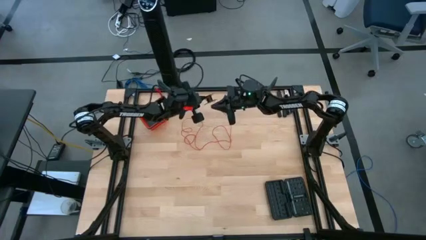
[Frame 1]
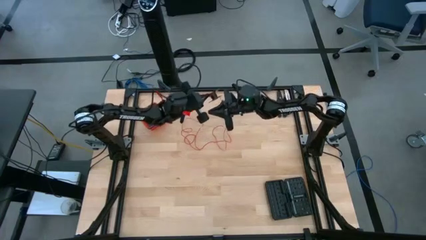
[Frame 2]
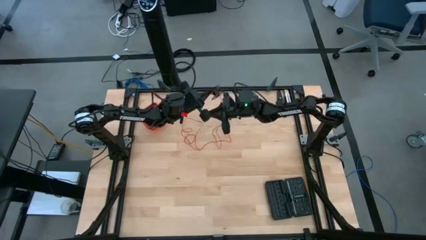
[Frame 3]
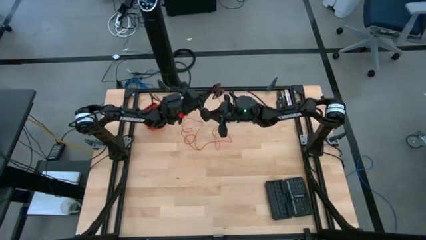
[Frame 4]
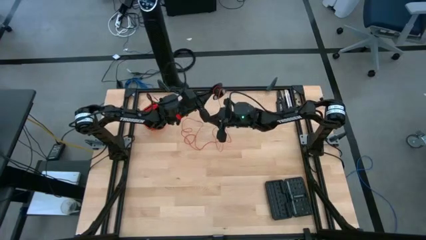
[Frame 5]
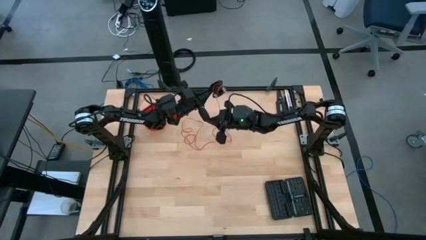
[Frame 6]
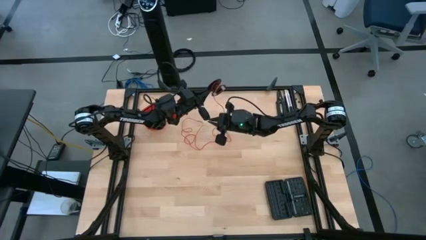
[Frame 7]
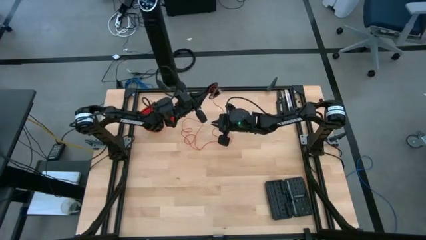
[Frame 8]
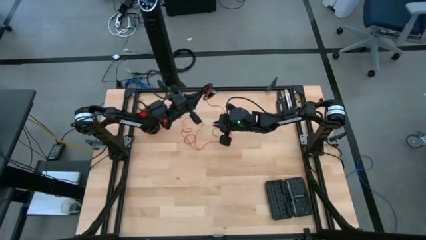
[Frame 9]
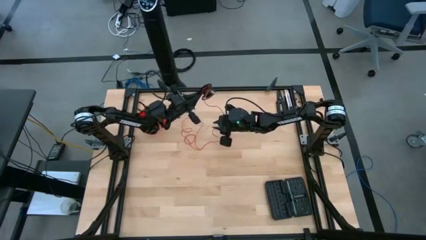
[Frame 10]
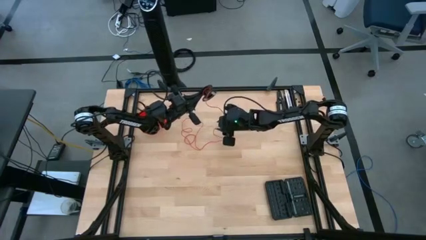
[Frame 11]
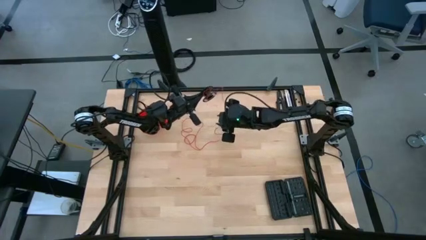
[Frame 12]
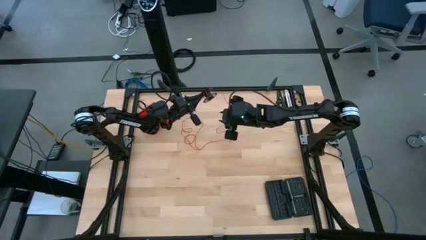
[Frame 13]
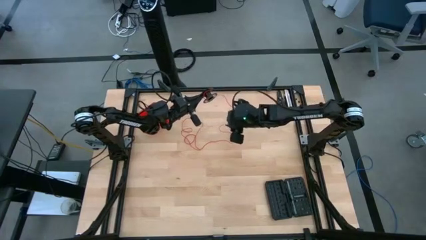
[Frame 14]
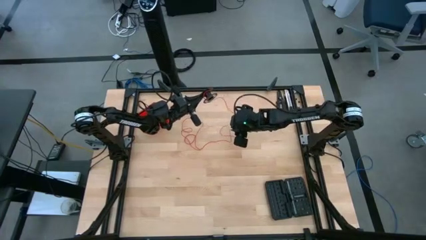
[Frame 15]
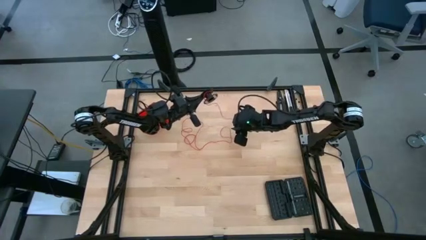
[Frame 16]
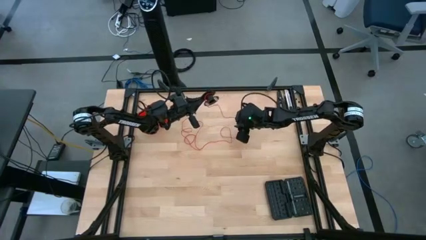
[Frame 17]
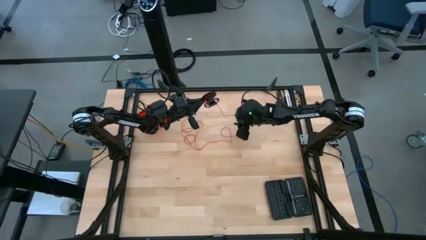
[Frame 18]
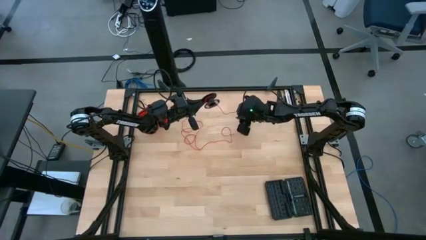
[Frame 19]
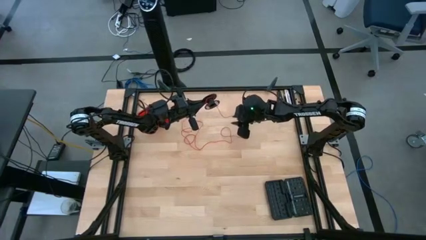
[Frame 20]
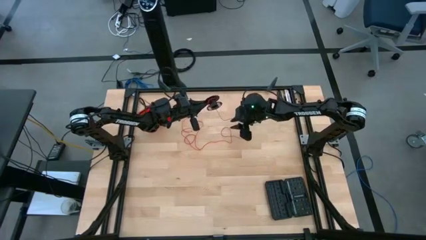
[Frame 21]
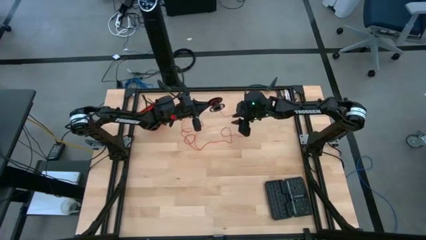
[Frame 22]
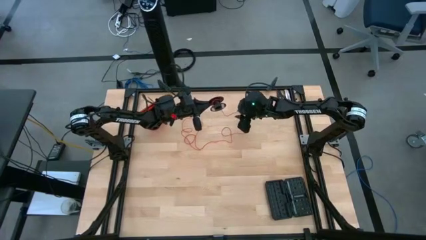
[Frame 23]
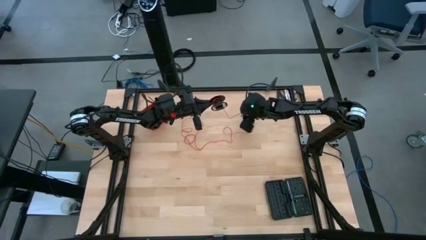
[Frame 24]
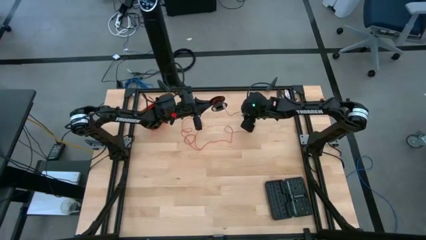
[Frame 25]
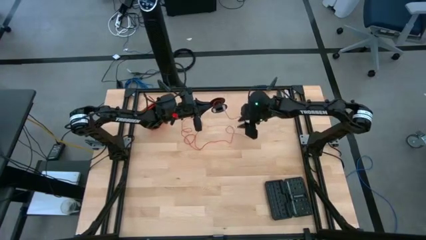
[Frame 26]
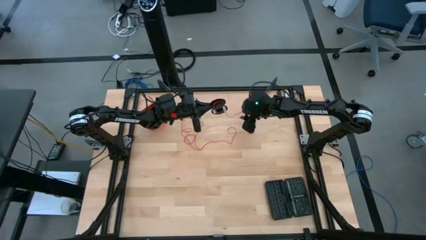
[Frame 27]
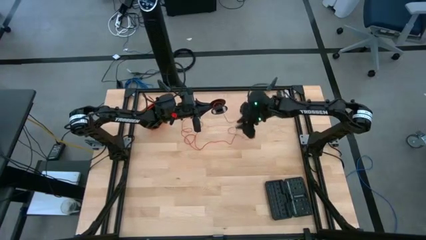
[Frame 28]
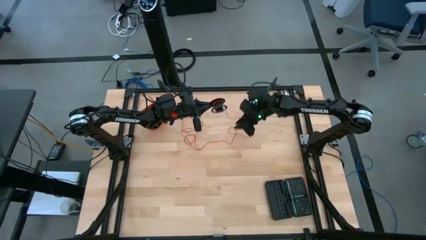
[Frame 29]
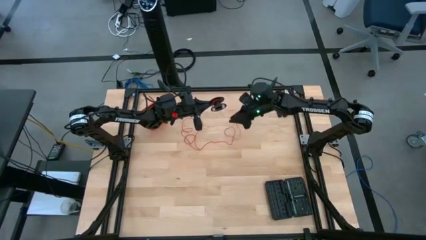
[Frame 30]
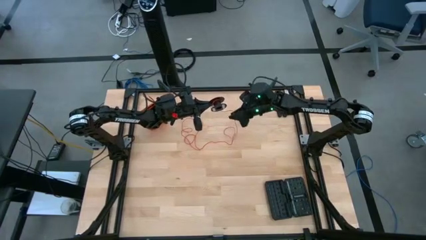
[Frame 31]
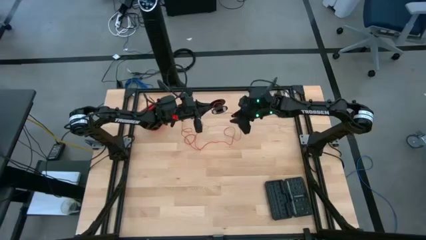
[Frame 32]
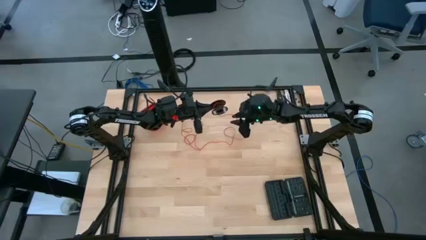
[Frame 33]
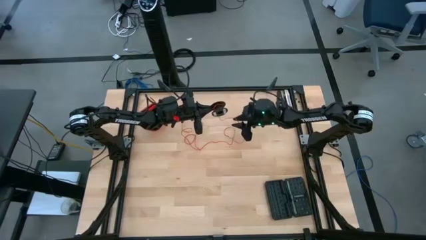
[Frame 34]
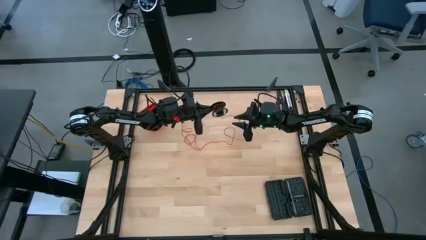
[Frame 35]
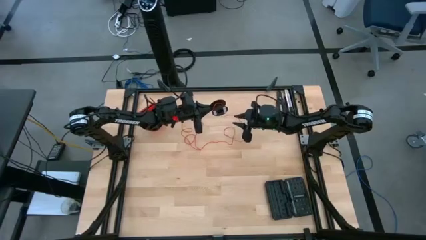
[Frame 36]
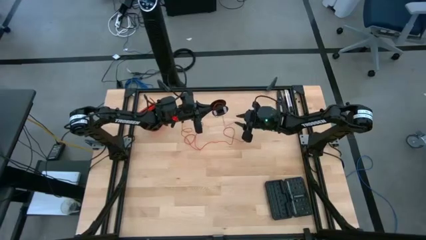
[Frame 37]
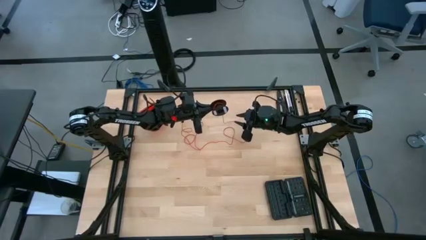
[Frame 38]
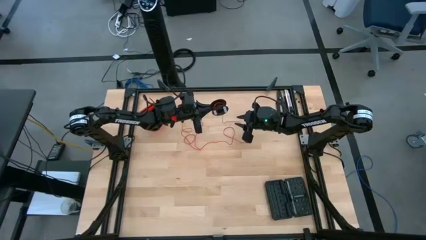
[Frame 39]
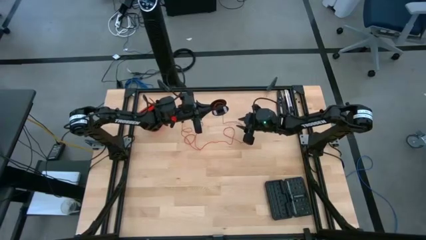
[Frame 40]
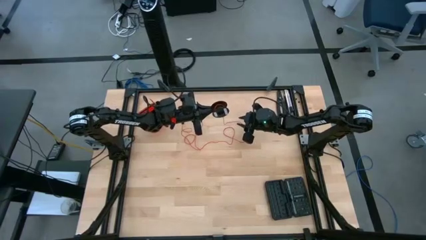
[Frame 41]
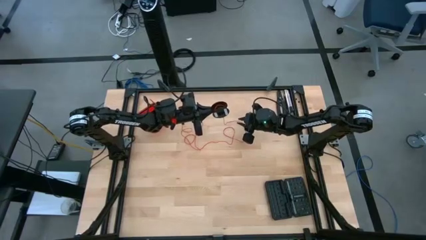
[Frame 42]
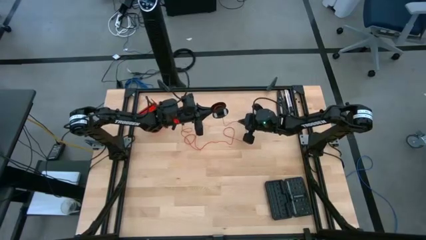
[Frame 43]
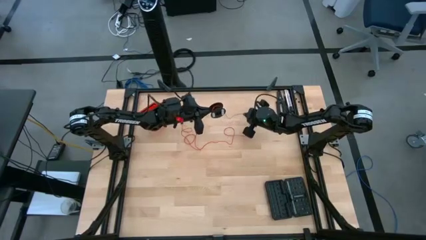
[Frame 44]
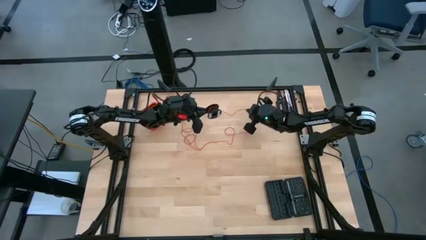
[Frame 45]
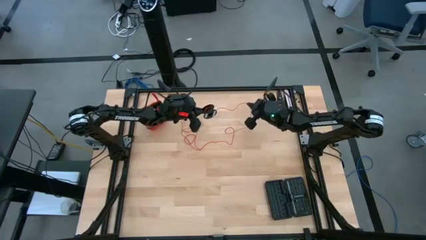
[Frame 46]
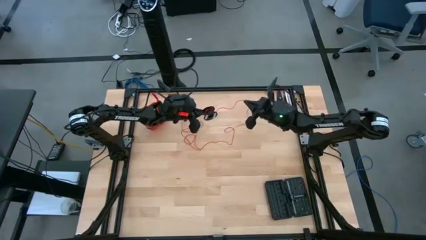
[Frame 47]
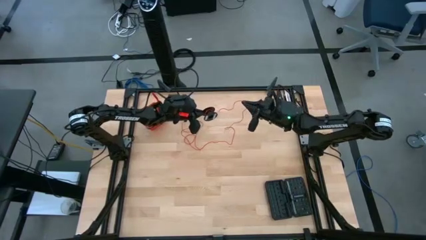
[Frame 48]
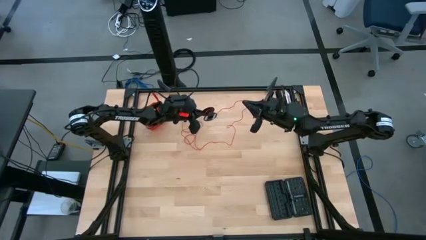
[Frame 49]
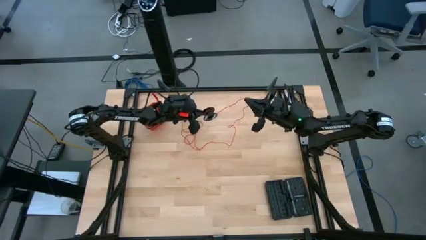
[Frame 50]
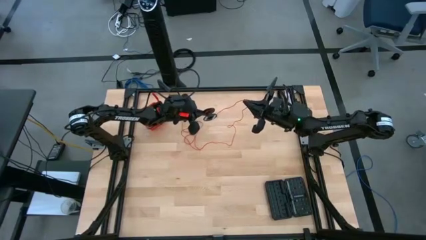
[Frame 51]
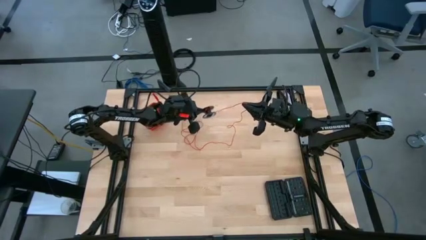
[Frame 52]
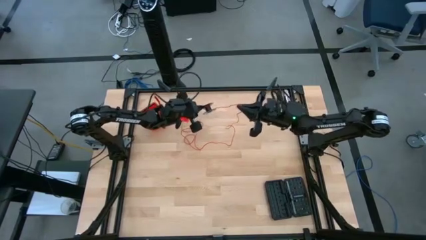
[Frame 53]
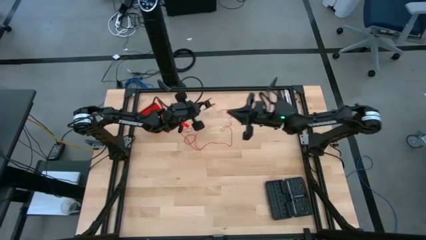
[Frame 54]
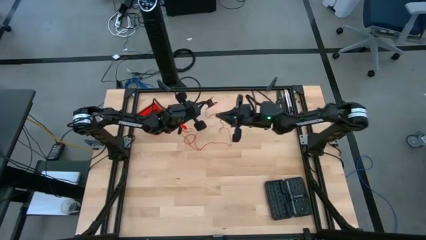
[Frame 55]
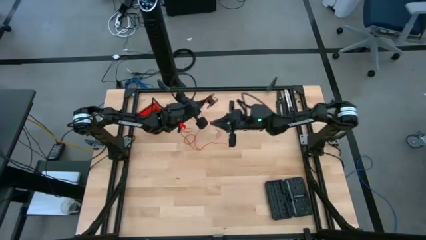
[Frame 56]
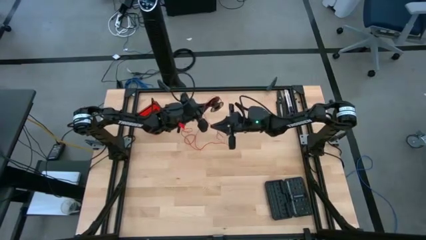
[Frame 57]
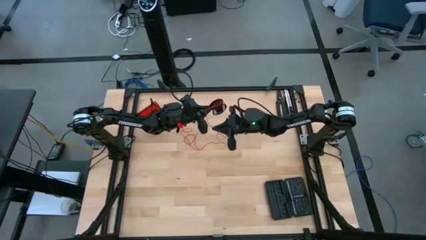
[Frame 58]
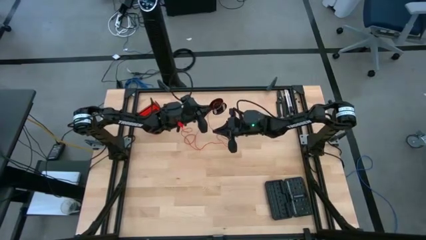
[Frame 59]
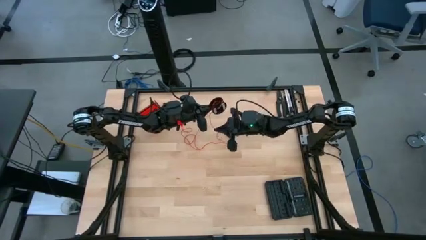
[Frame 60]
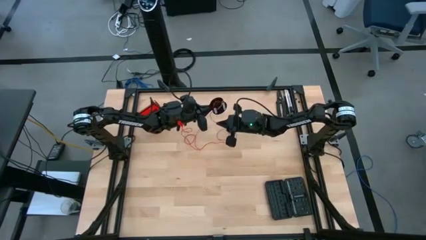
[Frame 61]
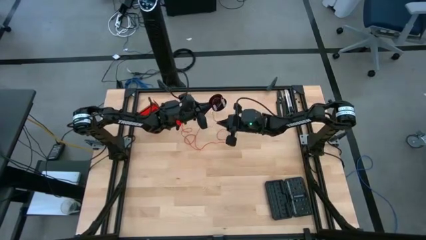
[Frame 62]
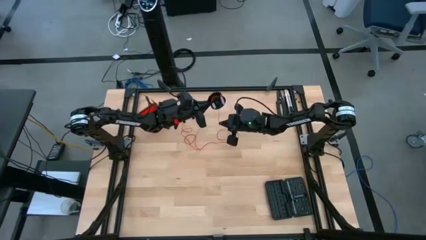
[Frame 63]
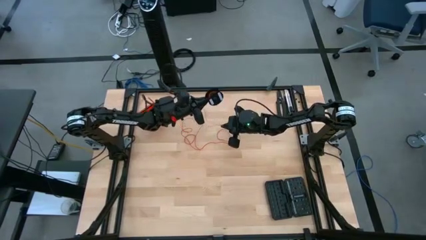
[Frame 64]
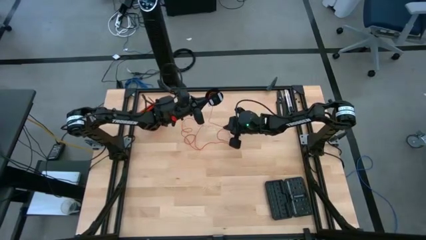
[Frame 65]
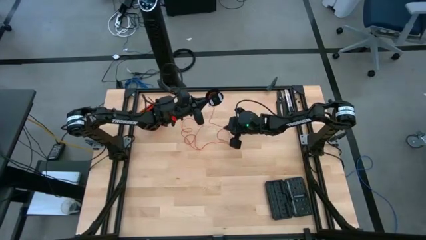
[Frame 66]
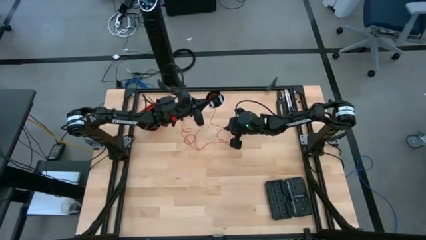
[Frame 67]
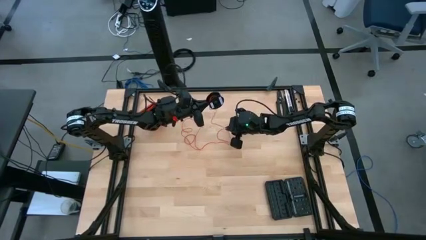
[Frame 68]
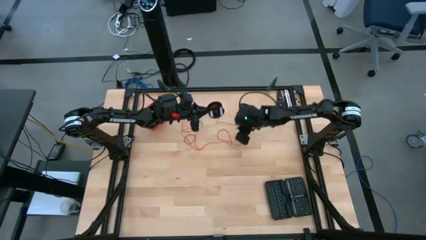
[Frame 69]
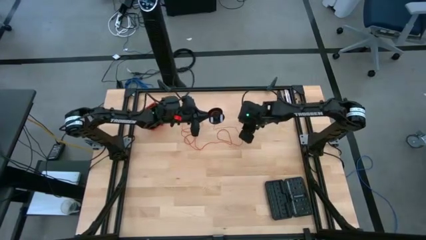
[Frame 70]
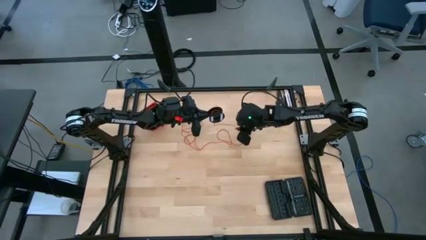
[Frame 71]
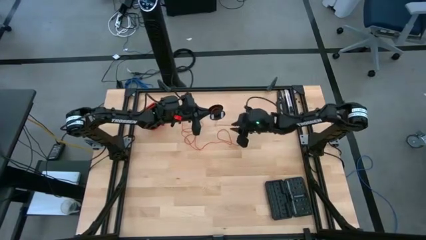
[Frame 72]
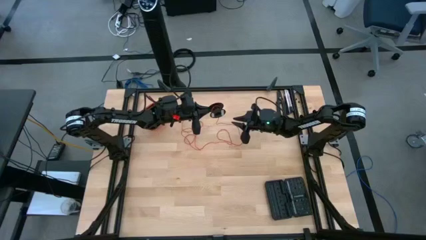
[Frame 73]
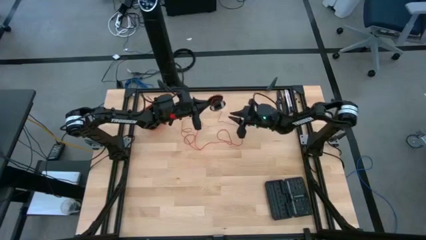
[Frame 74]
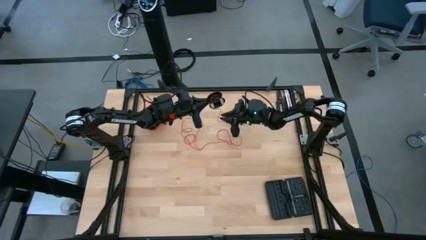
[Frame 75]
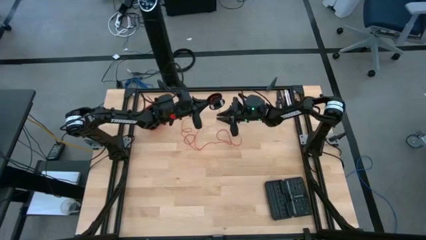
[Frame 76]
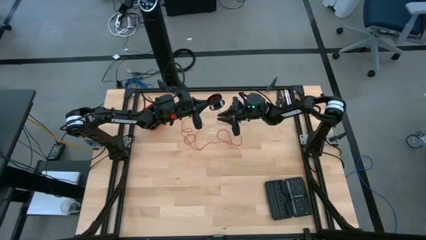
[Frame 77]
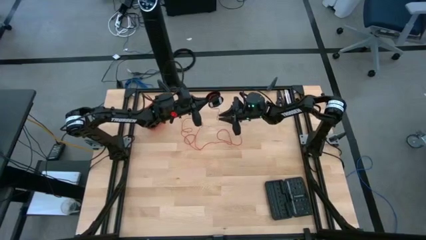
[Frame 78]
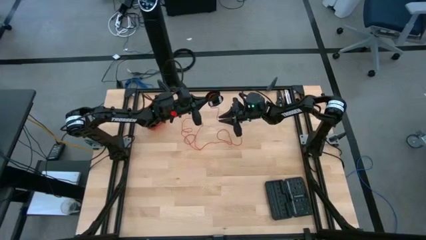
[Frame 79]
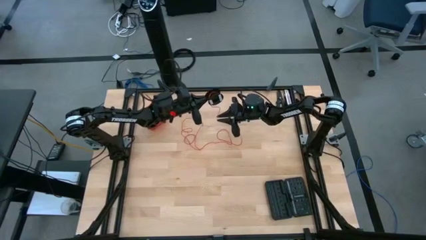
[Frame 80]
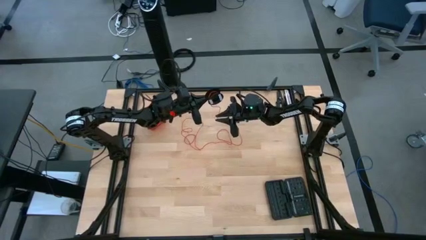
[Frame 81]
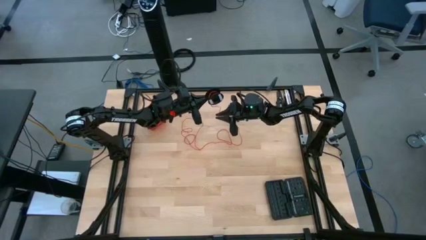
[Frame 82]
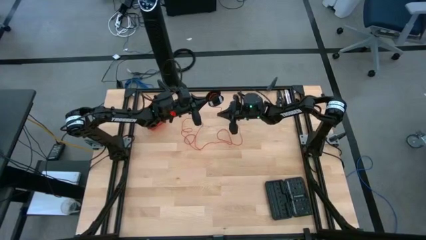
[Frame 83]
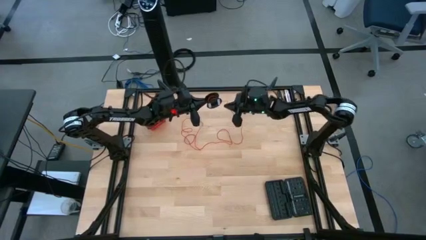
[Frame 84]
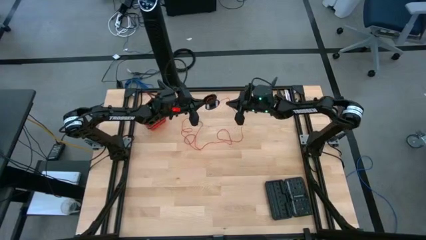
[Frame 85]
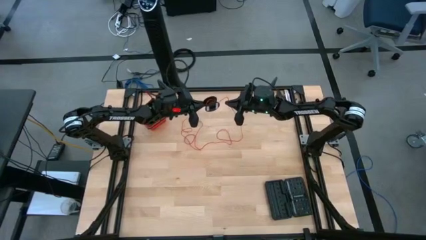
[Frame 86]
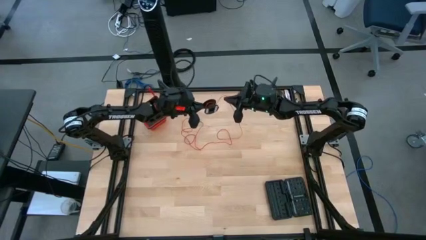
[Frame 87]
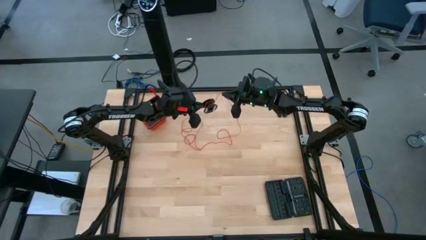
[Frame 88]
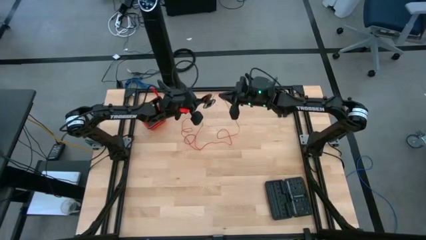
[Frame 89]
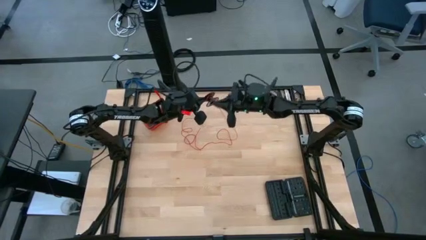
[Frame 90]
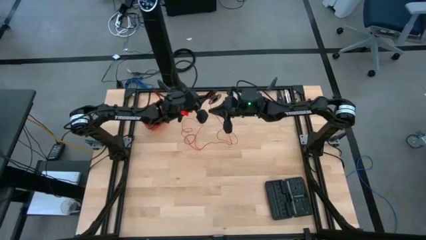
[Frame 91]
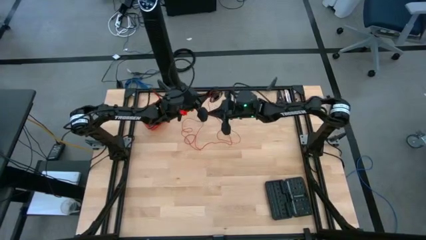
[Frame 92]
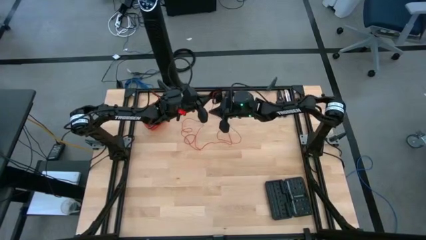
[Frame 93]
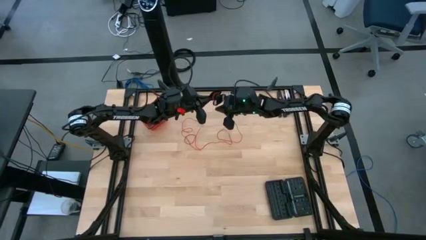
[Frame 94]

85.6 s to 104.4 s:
Task: Coil cords
Coil the wire to the spool
